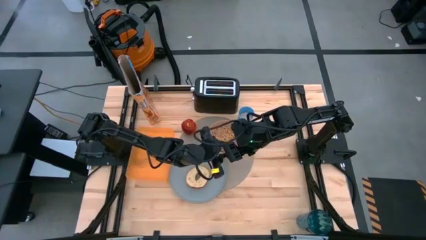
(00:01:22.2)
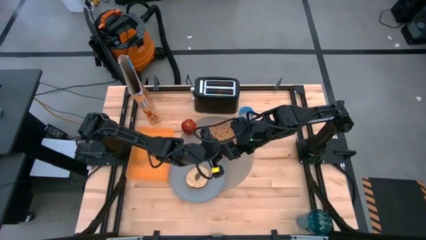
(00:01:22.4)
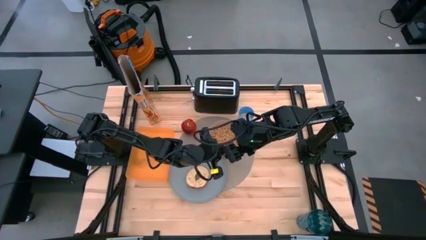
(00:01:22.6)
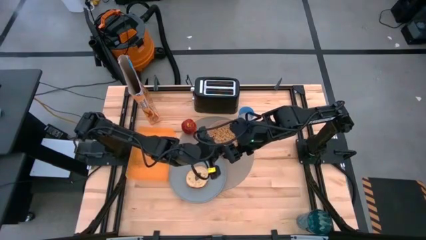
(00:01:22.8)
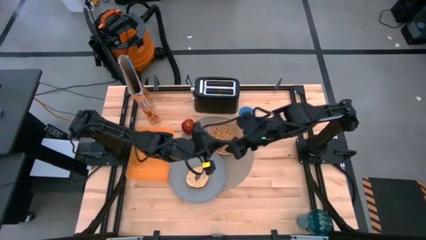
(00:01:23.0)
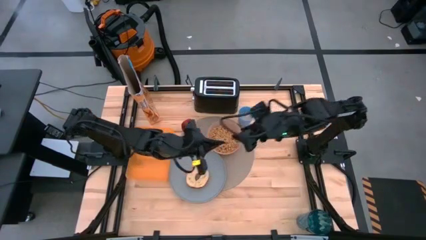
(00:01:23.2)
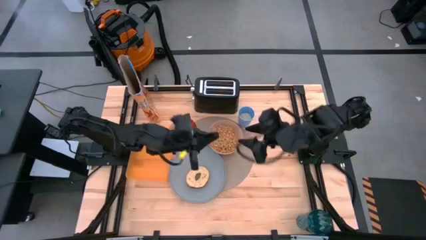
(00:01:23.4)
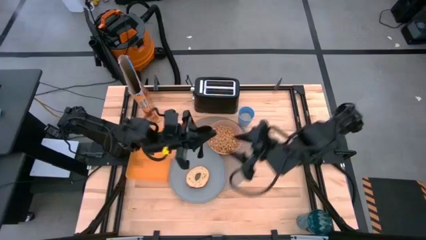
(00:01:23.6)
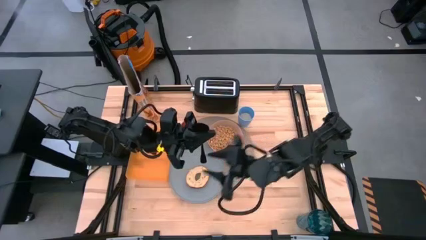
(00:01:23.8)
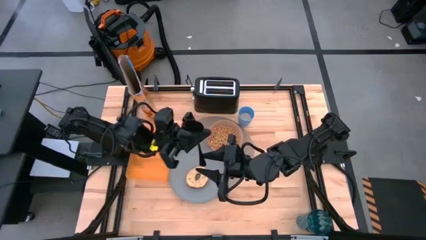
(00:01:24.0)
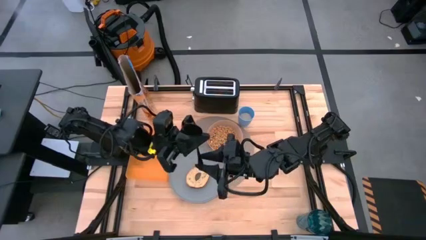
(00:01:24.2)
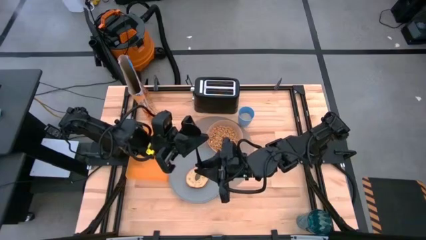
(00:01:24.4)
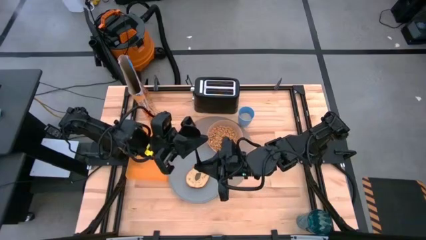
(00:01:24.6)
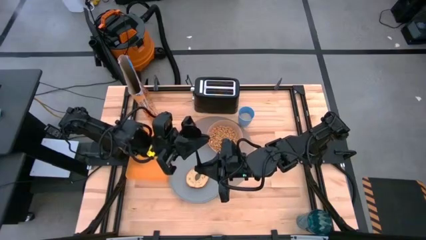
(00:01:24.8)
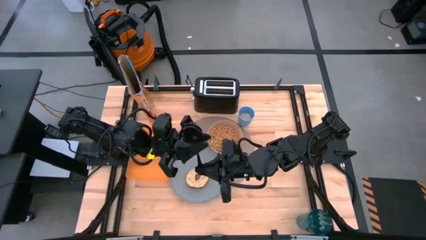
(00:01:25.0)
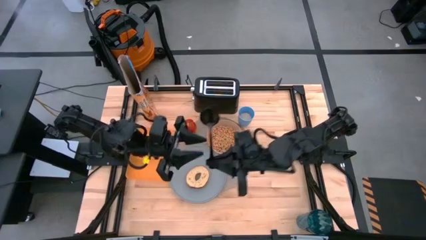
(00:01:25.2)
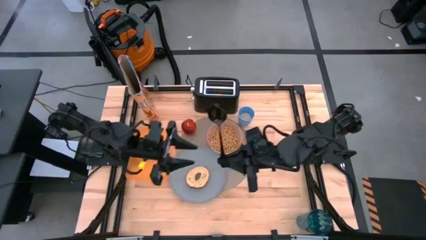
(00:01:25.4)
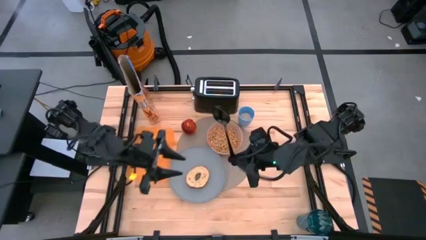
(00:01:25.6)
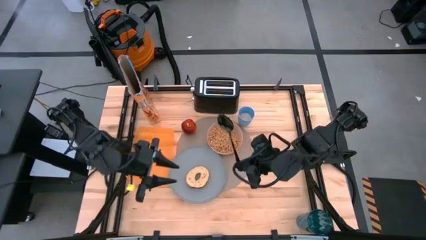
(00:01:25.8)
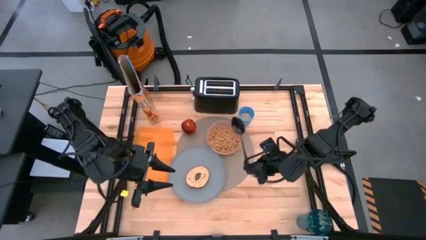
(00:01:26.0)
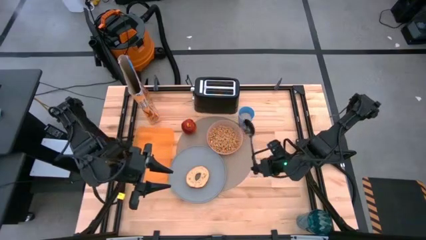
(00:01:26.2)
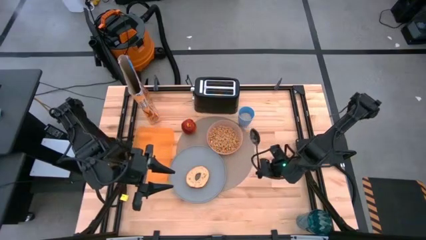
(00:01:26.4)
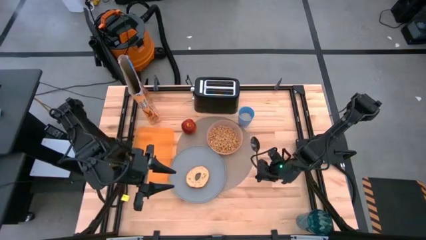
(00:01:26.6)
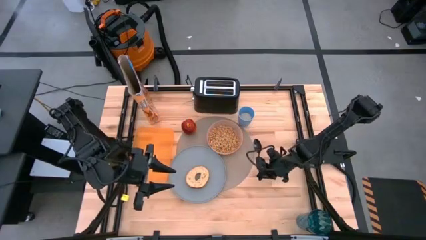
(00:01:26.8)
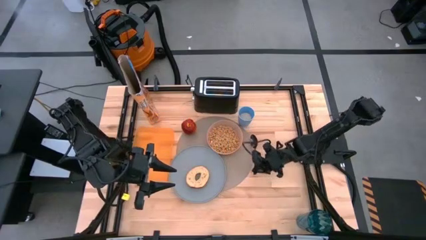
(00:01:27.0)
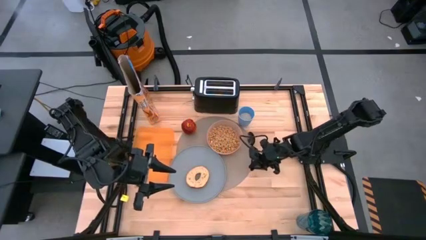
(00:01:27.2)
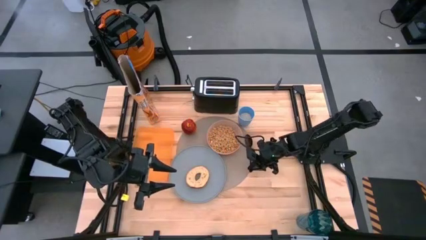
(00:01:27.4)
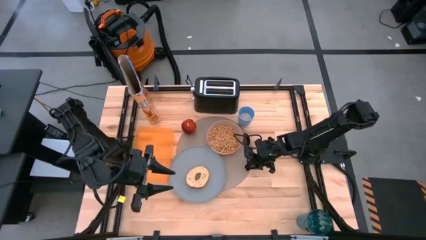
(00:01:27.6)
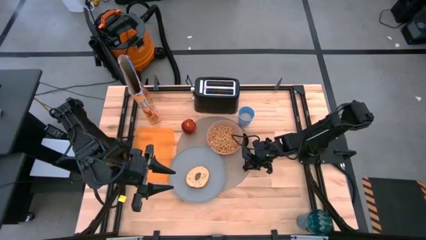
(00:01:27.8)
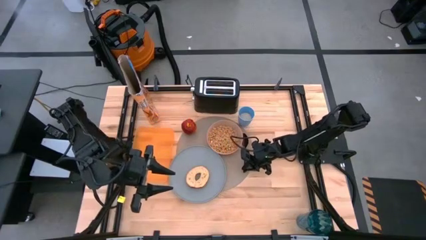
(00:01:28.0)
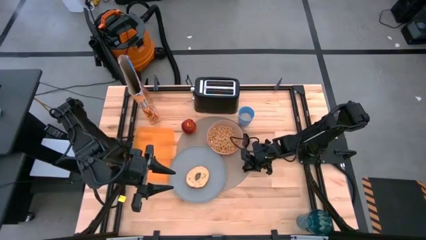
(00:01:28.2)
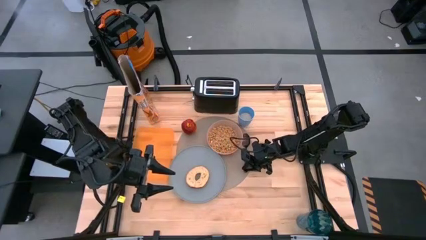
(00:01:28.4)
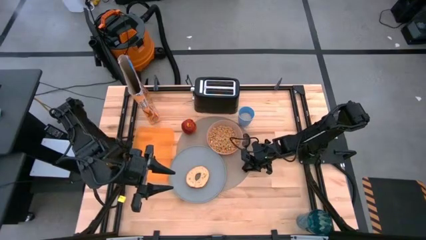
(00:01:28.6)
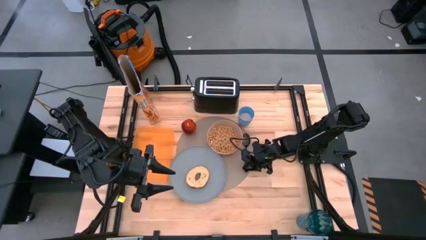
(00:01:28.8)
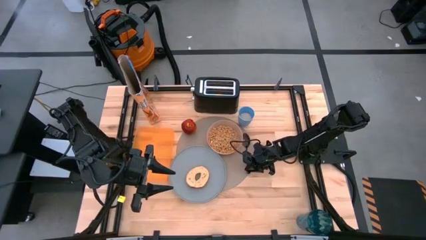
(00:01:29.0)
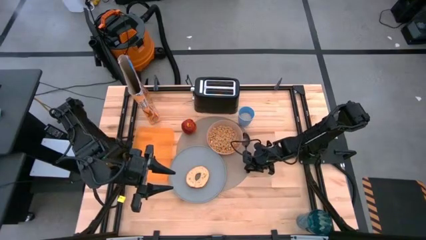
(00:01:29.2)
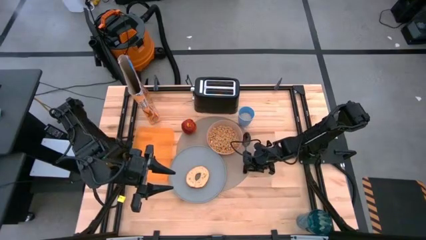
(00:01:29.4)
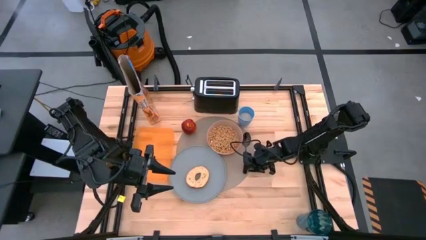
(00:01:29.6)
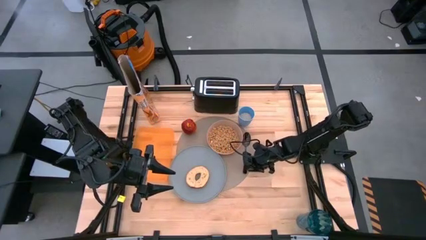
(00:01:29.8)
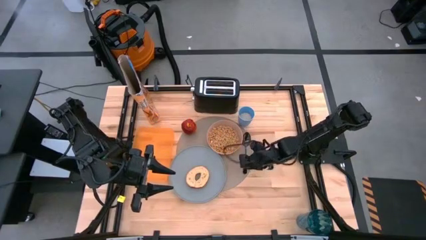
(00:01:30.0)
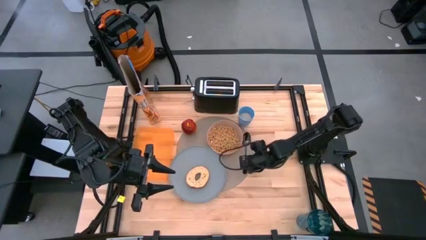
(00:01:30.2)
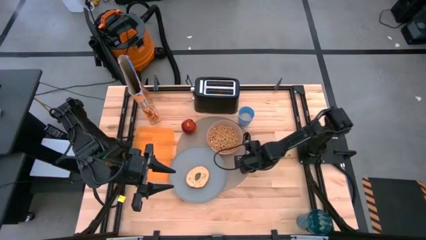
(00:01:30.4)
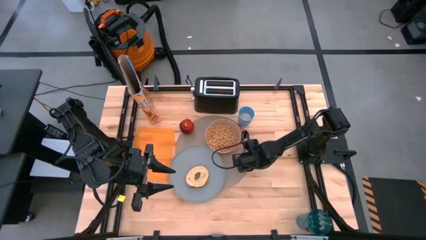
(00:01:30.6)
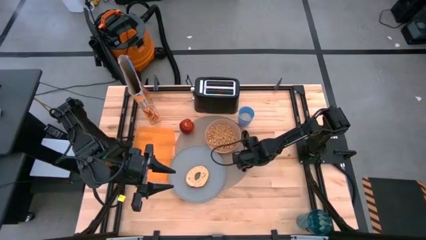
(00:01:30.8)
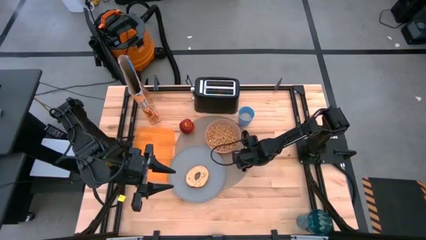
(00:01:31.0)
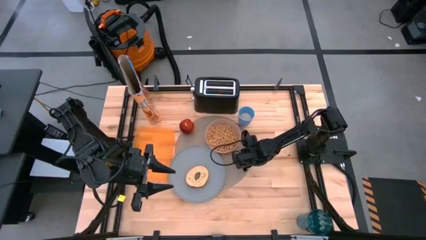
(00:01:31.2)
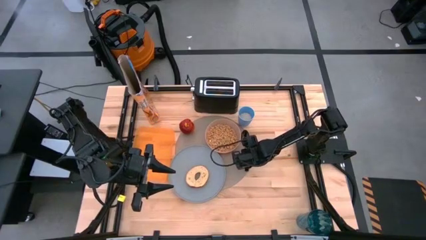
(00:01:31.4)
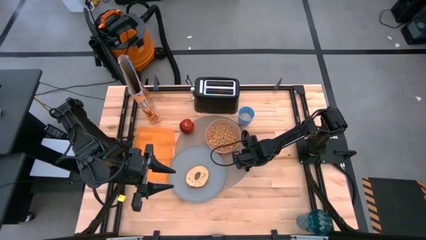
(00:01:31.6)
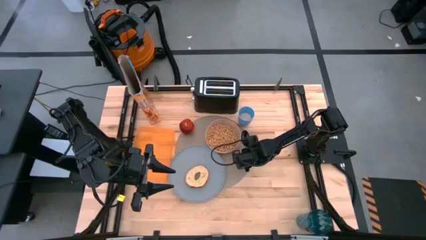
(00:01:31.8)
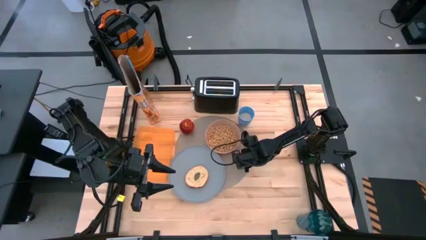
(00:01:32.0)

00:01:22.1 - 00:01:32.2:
Task: Arrange a breakfast setting
Remove the black spoon from the blue glass and place it on the middle right of the gray placemat
